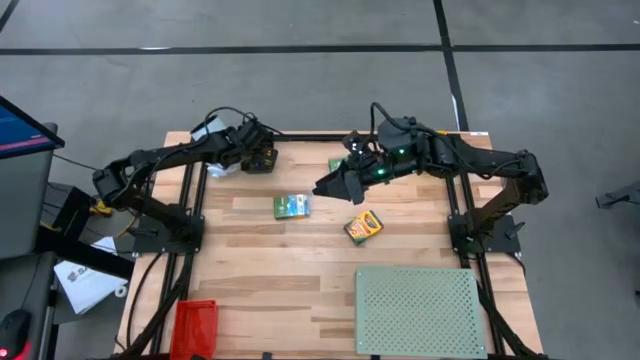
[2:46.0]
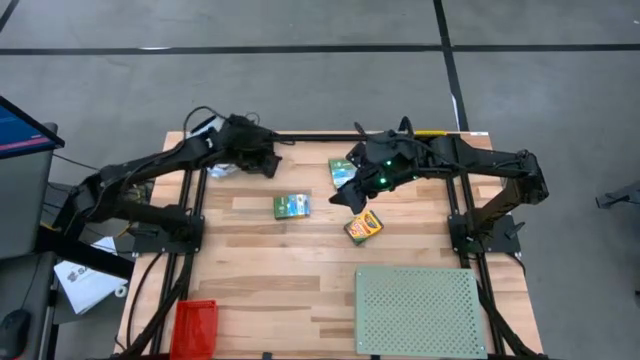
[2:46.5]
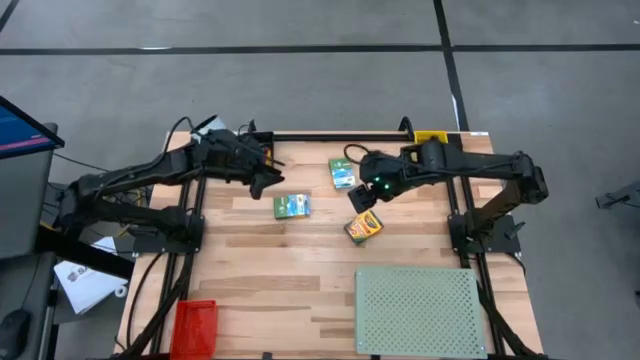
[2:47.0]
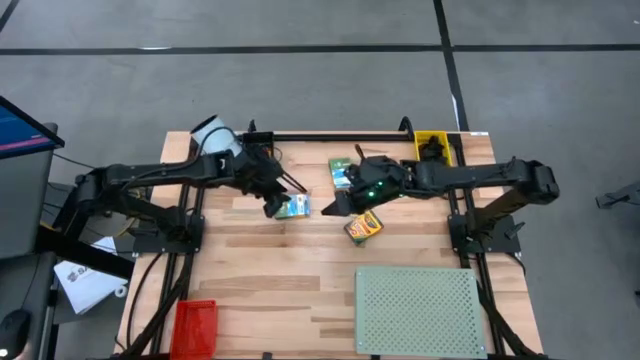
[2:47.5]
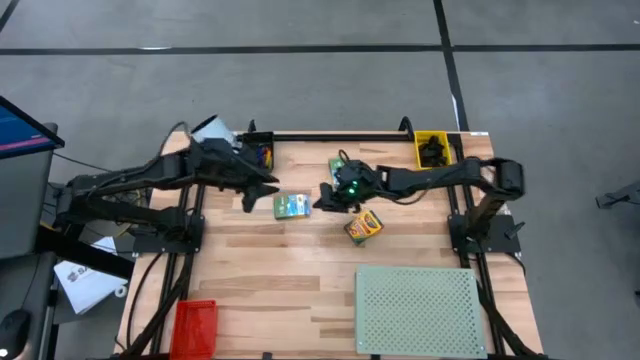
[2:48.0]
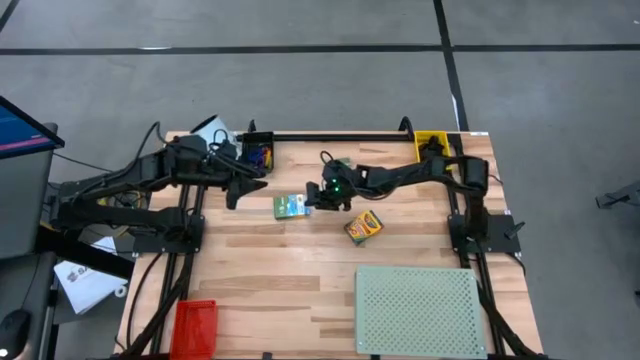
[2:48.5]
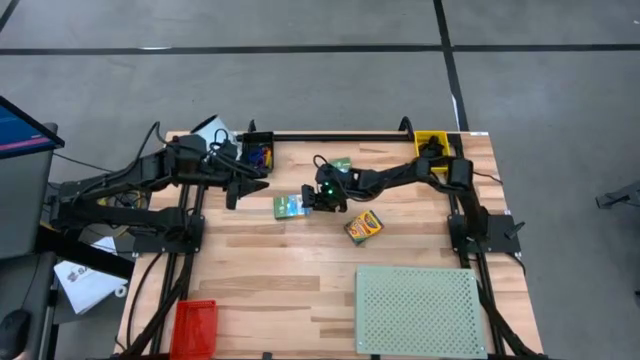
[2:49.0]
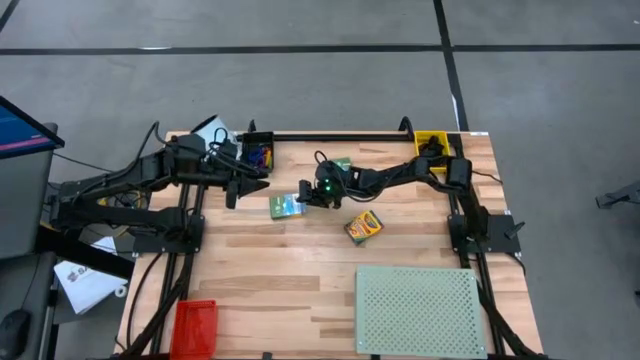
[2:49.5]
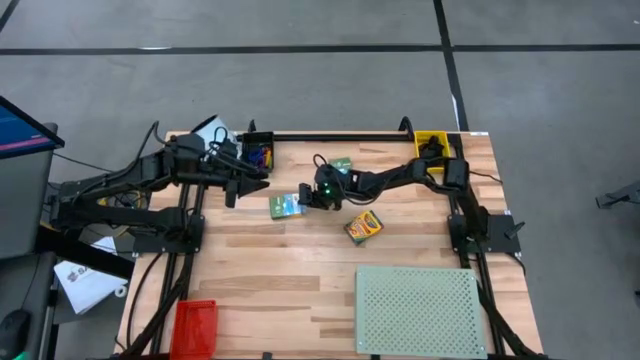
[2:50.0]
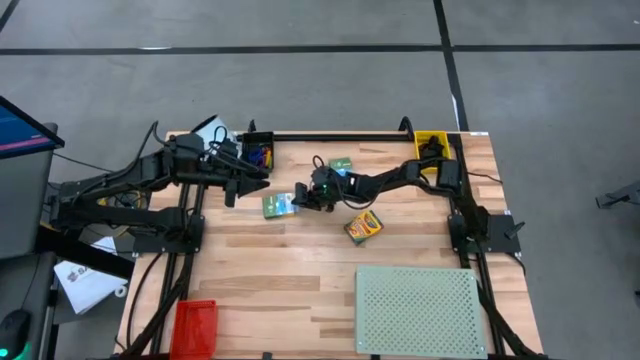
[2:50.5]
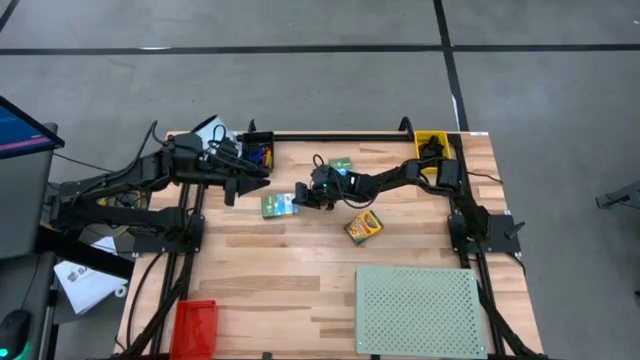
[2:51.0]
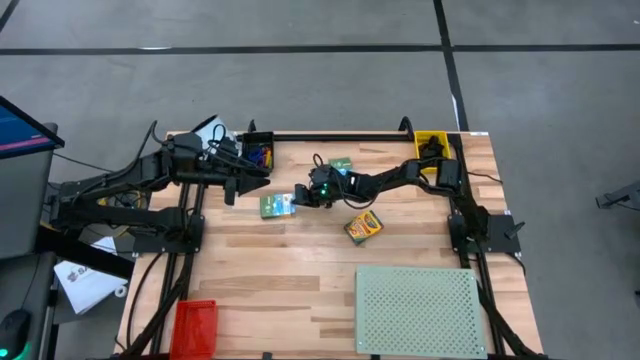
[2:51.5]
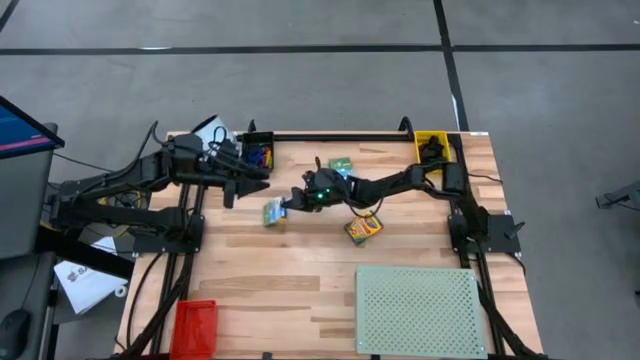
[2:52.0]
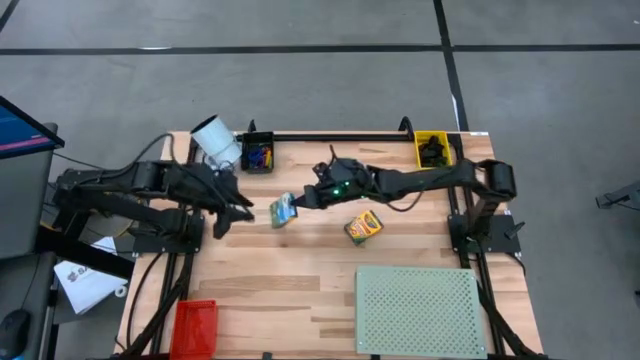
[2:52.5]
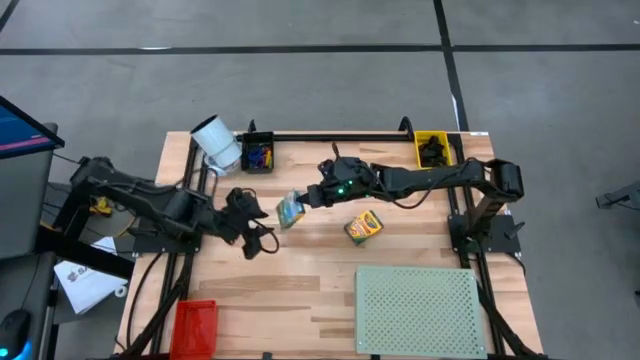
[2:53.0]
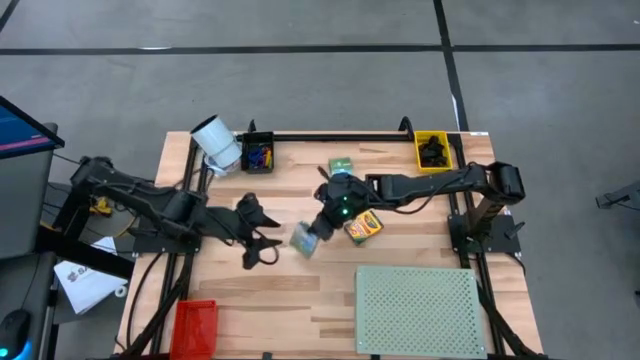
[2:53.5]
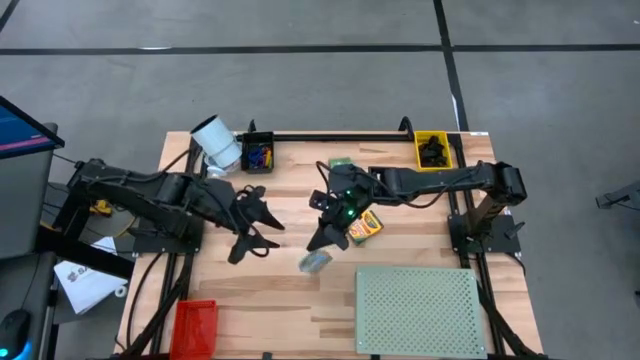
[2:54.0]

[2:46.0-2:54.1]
Task: Pick & Place Office Desk Supplies
Put the green crayon box into the orange bin

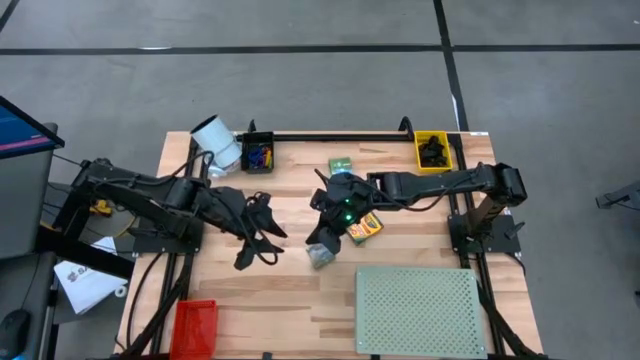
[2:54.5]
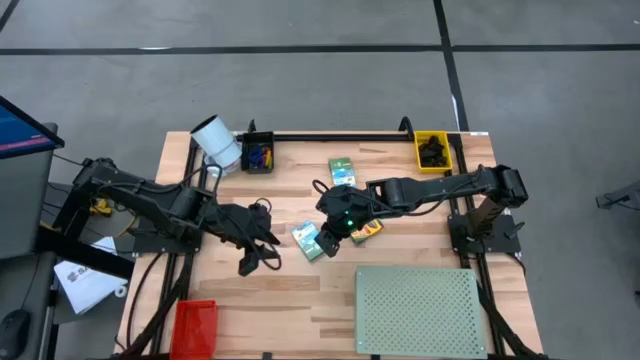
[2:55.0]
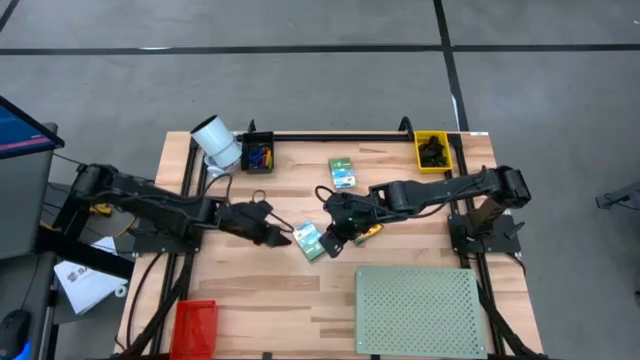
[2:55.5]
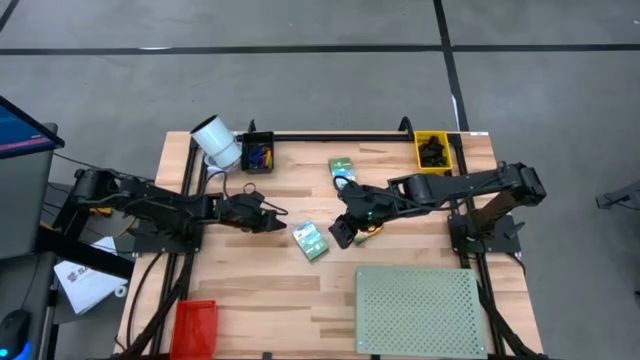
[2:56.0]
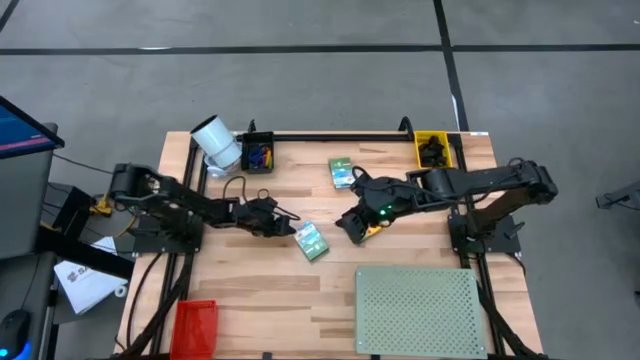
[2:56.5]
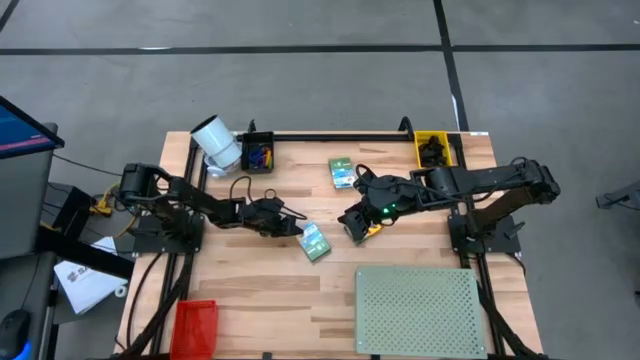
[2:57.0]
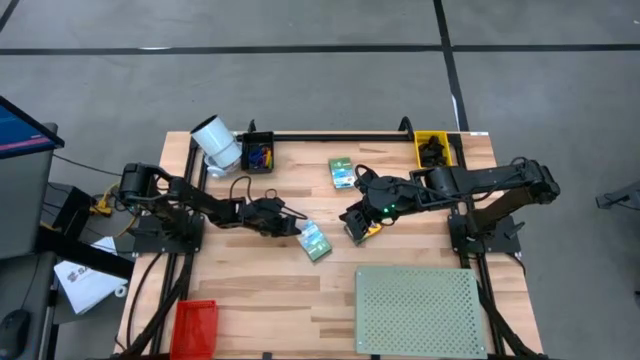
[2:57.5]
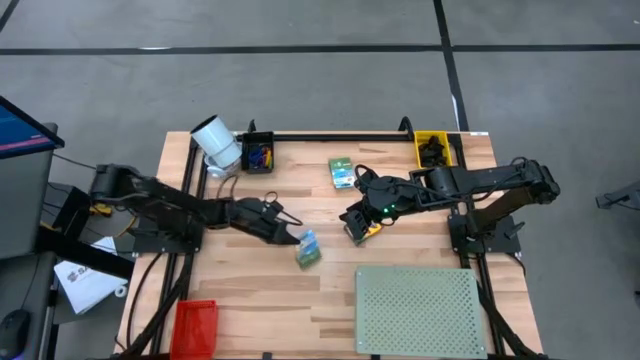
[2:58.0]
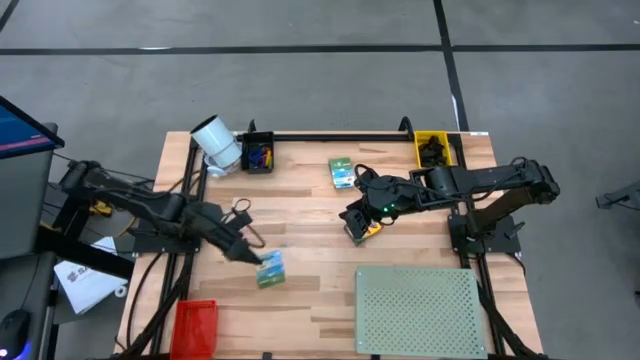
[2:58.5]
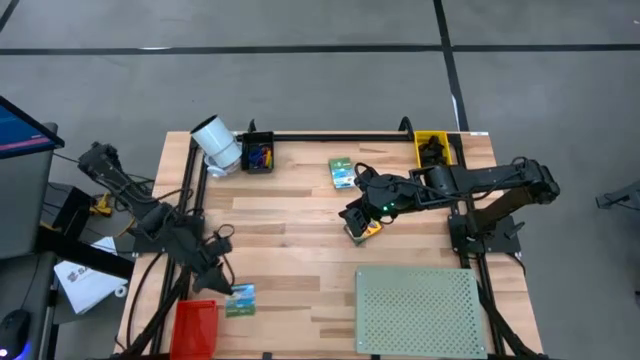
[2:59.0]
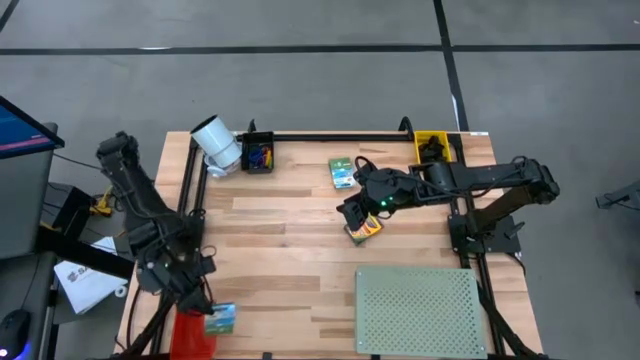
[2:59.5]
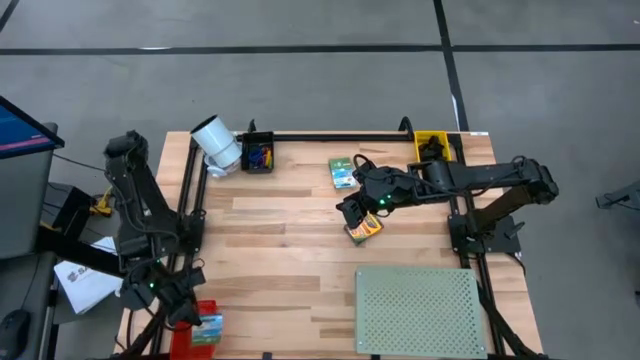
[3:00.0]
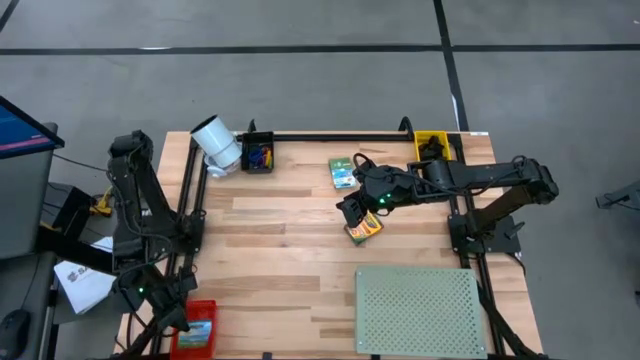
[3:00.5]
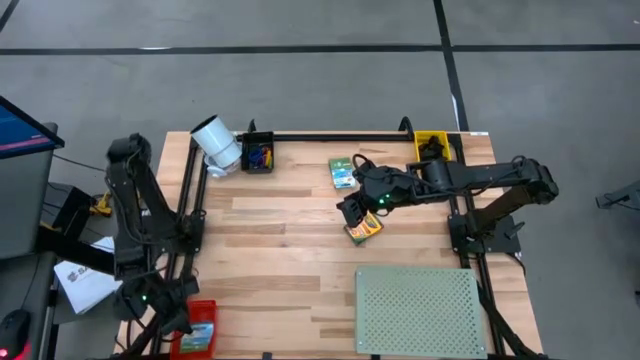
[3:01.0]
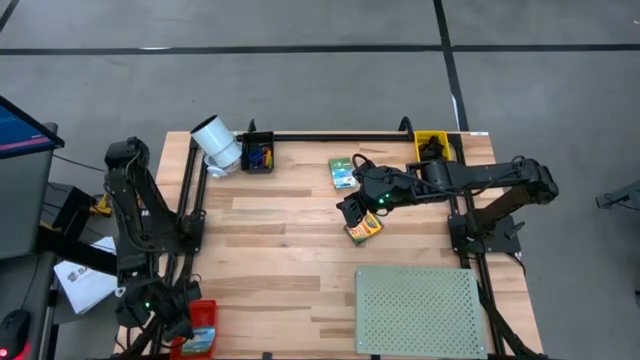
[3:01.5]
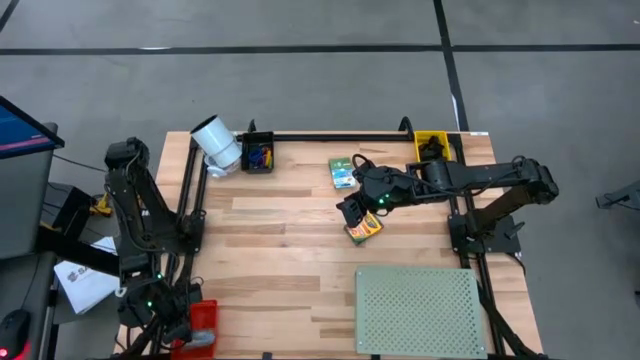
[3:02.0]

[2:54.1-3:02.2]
Put the green crayon box into the orange bin

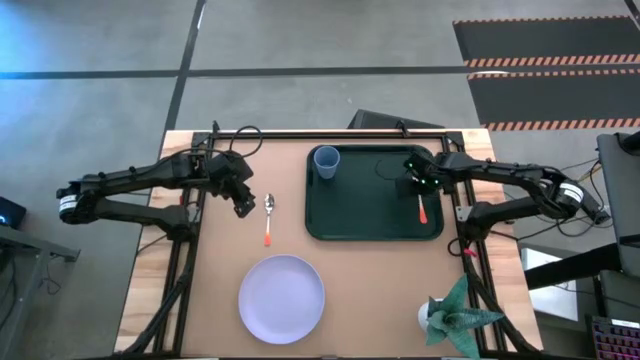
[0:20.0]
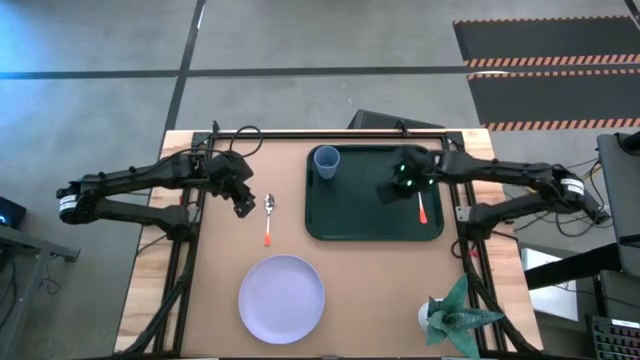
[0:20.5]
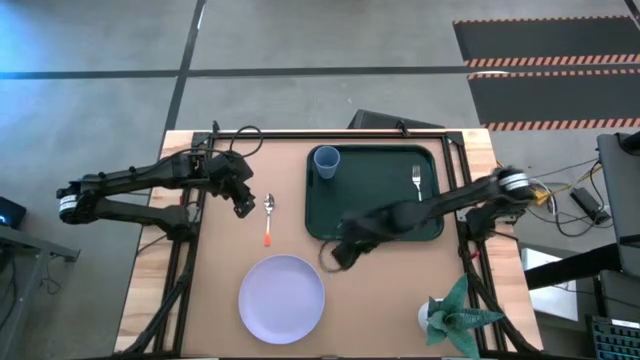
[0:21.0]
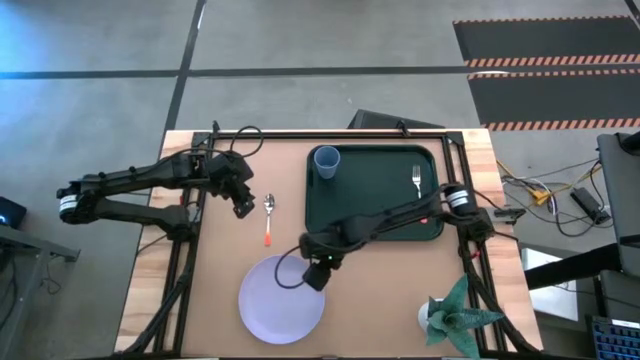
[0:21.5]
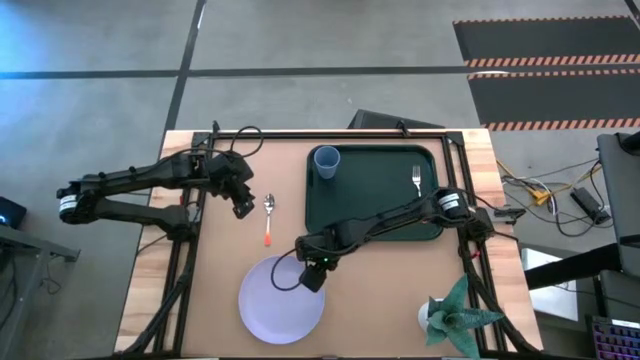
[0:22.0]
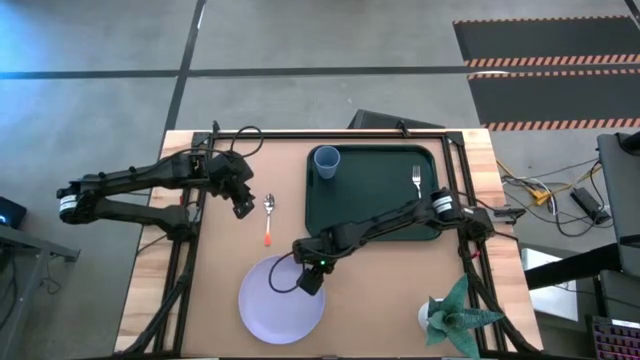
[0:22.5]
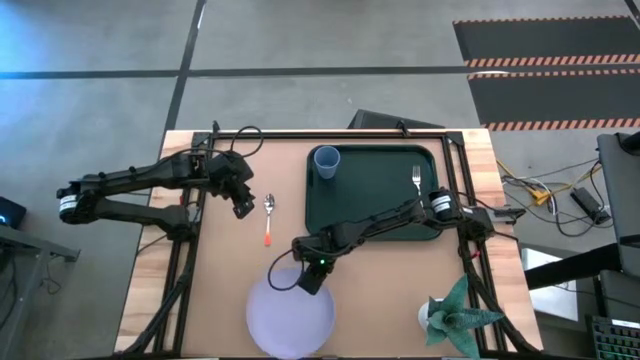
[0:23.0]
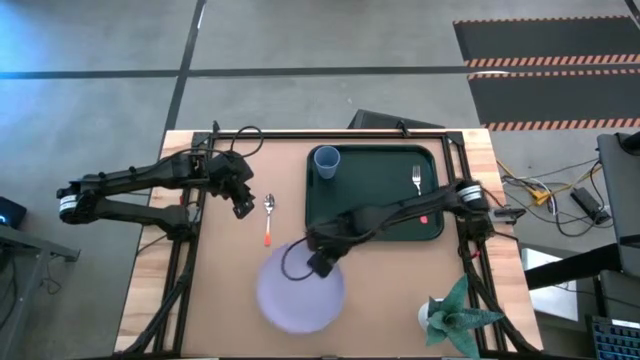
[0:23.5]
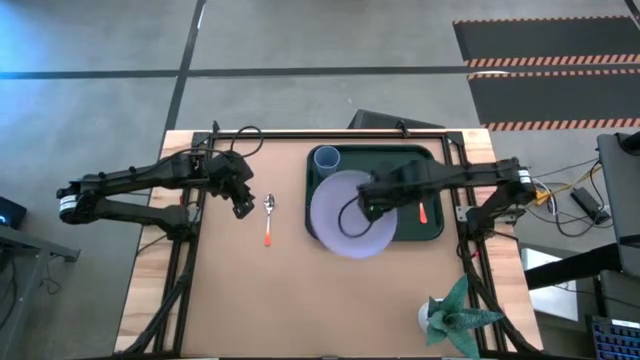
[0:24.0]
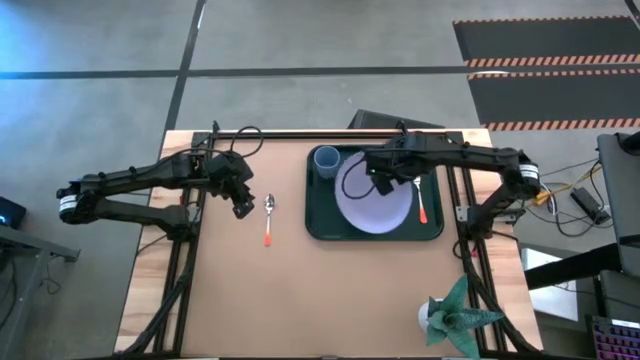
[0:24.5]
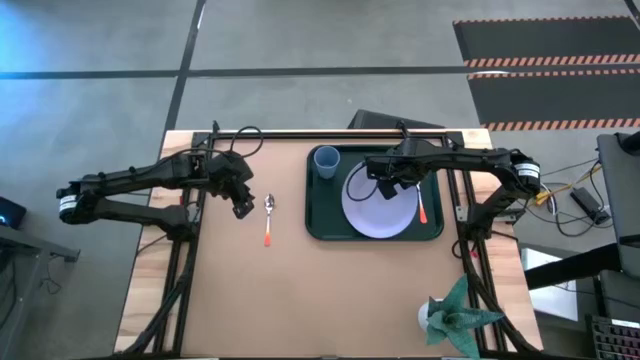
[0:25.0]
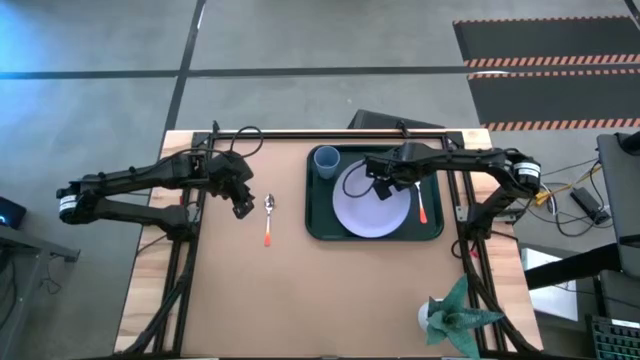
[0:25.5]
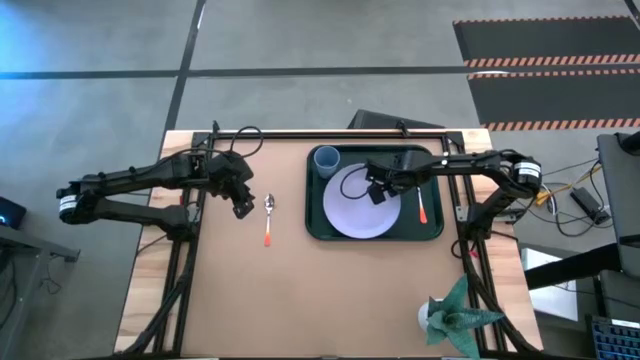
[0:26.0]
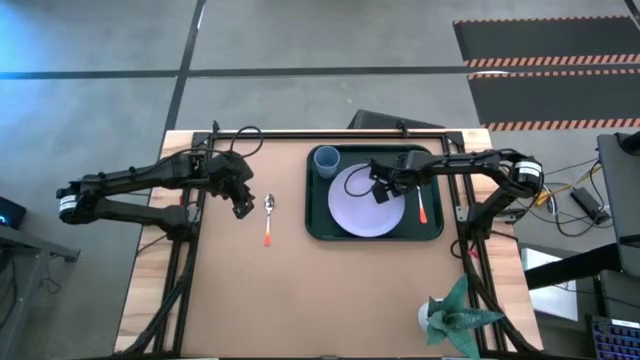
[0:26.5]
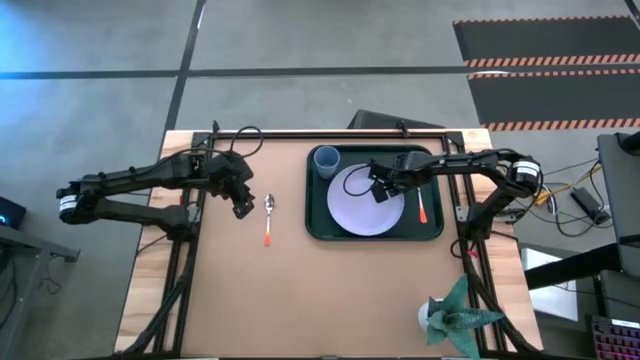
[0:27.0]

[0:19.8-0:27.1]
Task: Pick and place plate/cup/fork/spoon on tray
Put the violet plate on the black tray to the bottom right of the blue cup
